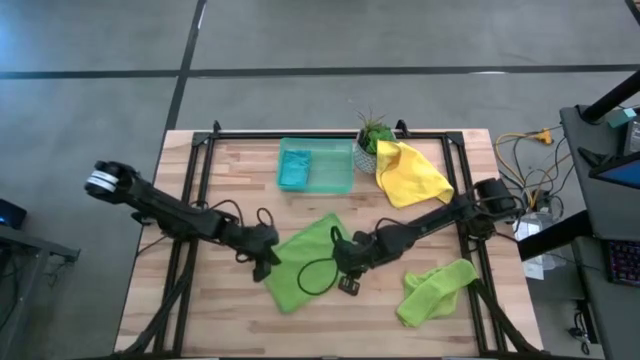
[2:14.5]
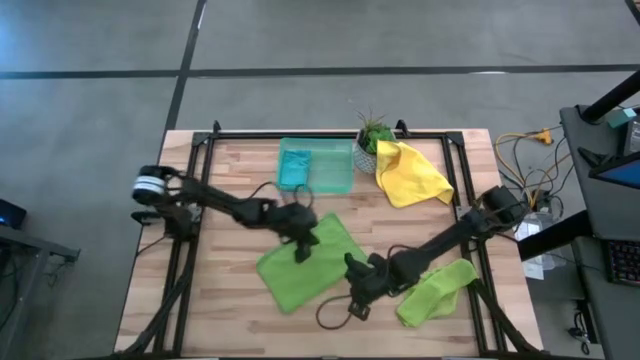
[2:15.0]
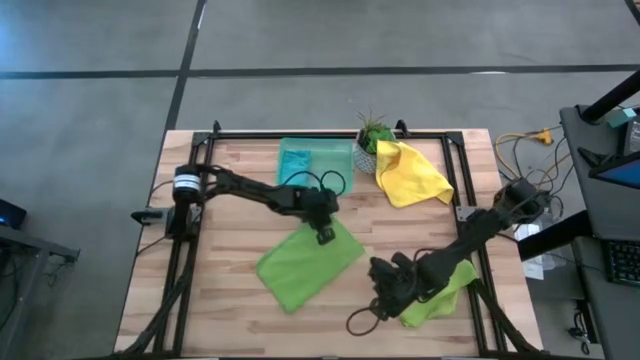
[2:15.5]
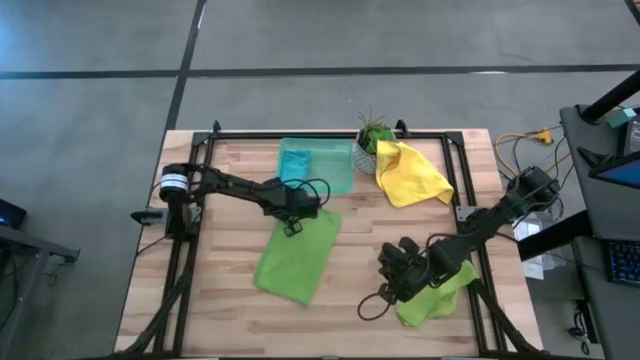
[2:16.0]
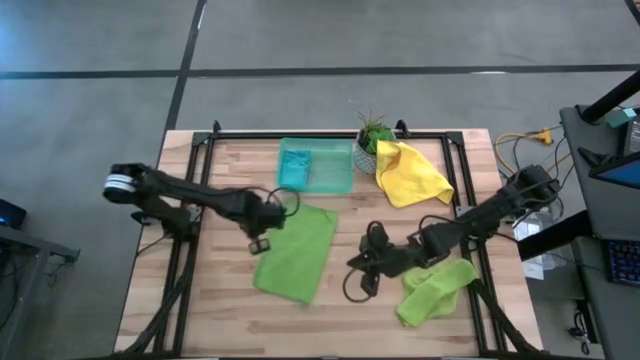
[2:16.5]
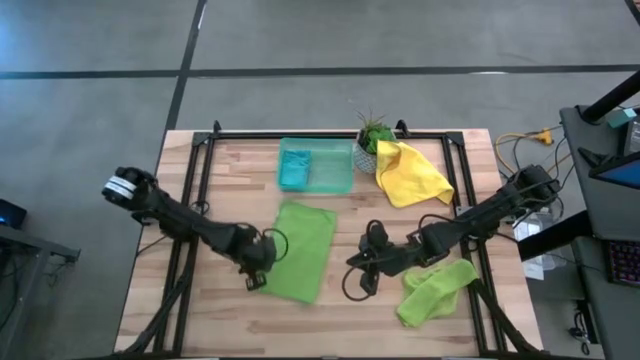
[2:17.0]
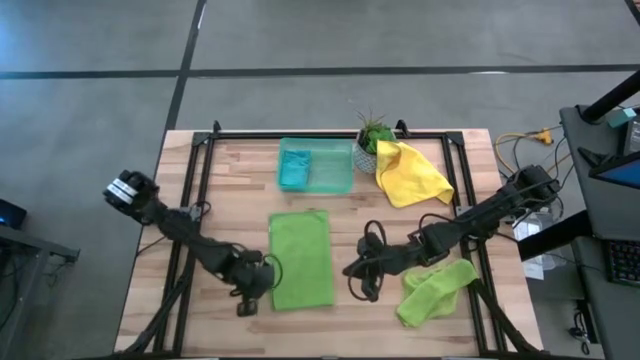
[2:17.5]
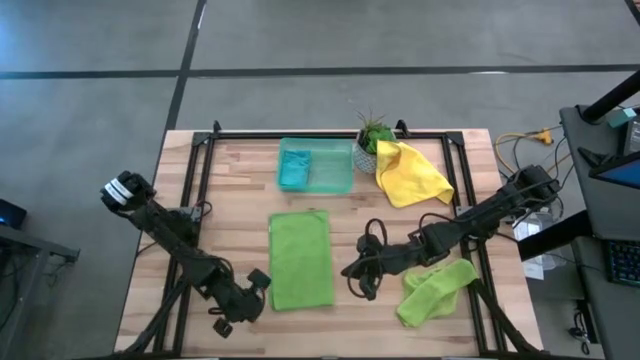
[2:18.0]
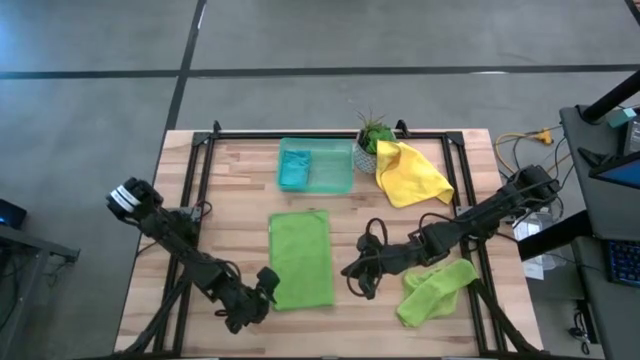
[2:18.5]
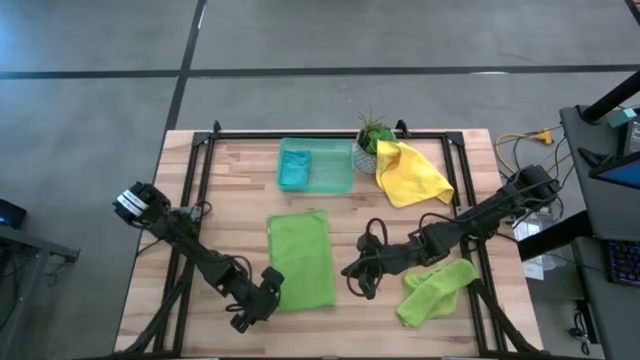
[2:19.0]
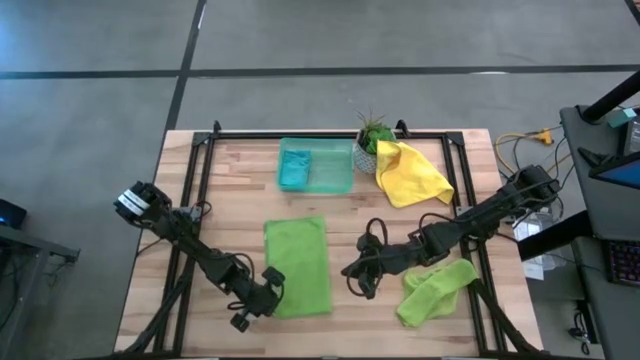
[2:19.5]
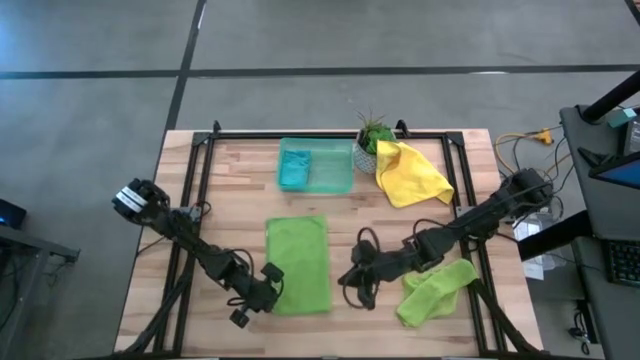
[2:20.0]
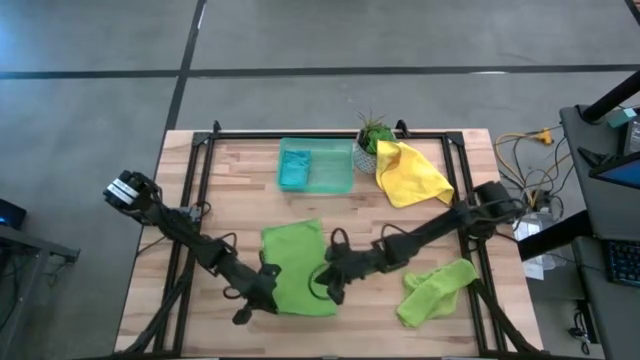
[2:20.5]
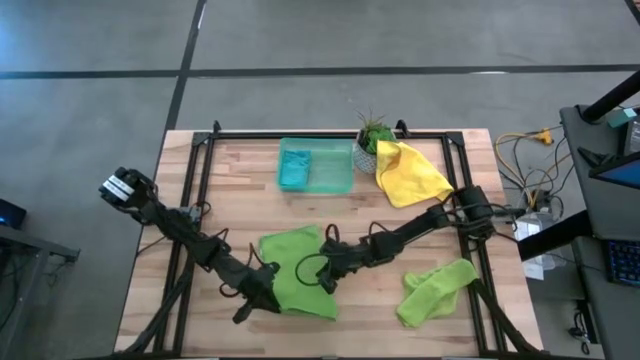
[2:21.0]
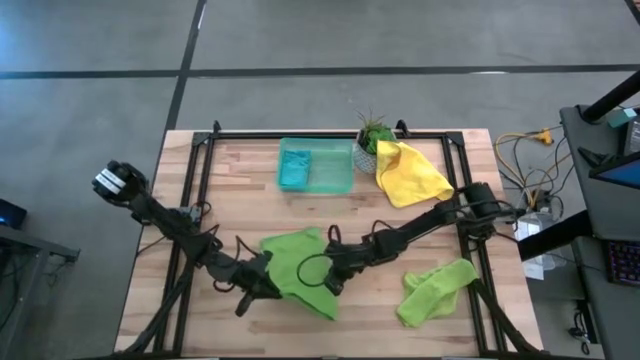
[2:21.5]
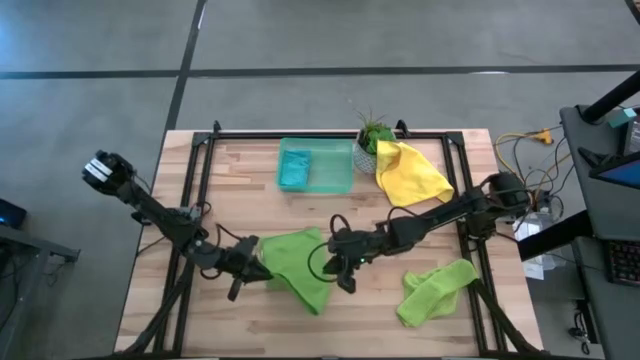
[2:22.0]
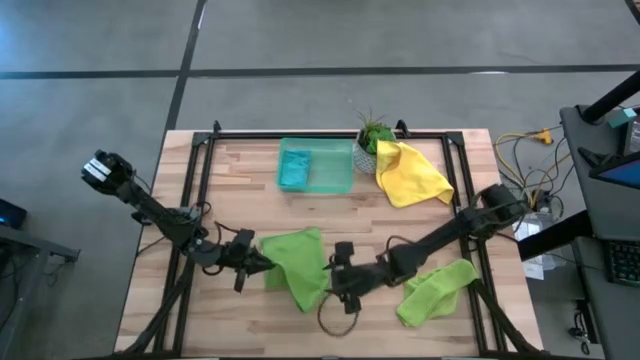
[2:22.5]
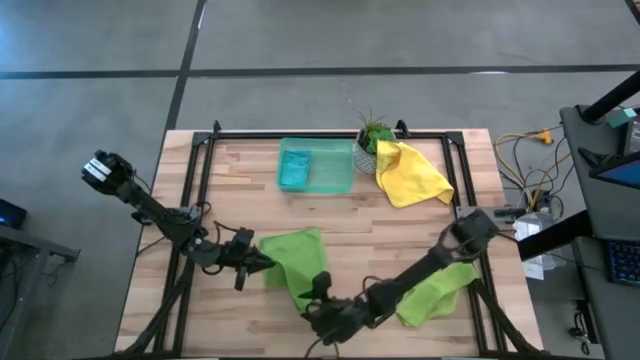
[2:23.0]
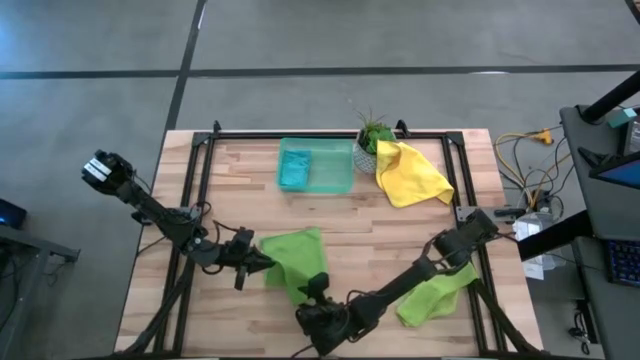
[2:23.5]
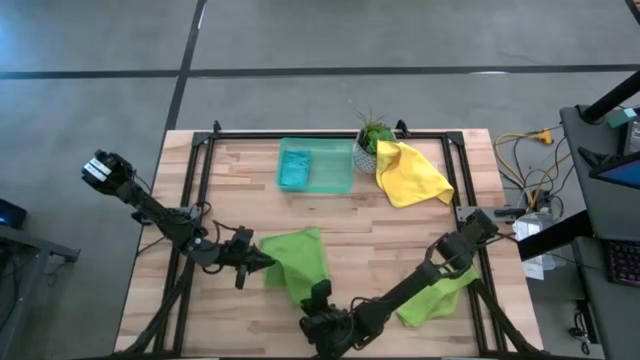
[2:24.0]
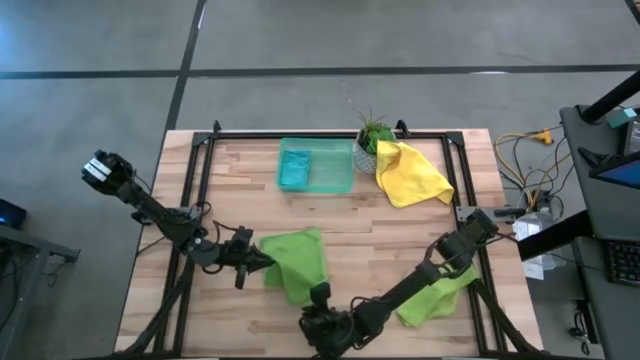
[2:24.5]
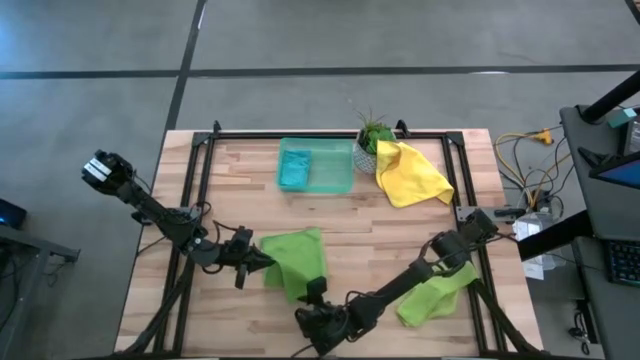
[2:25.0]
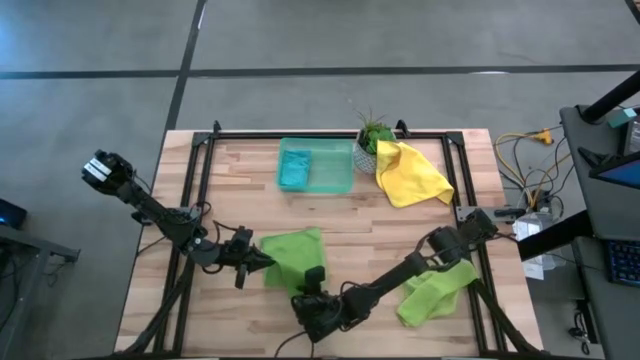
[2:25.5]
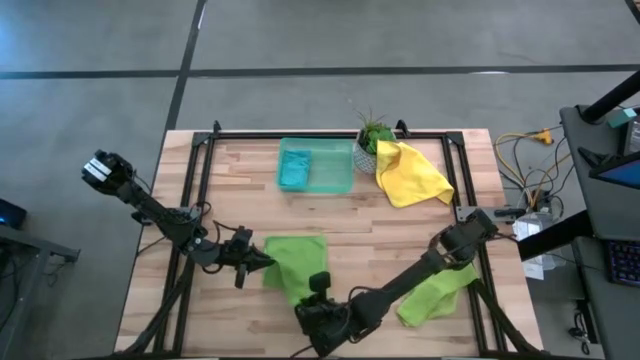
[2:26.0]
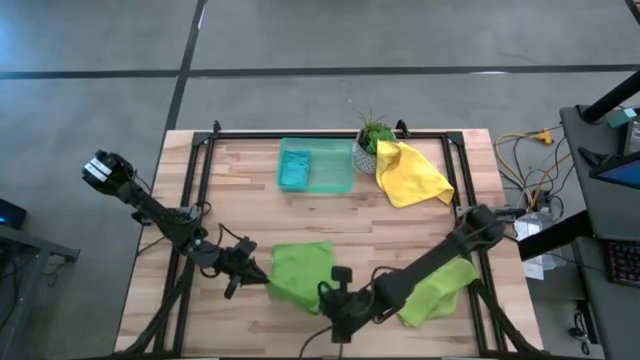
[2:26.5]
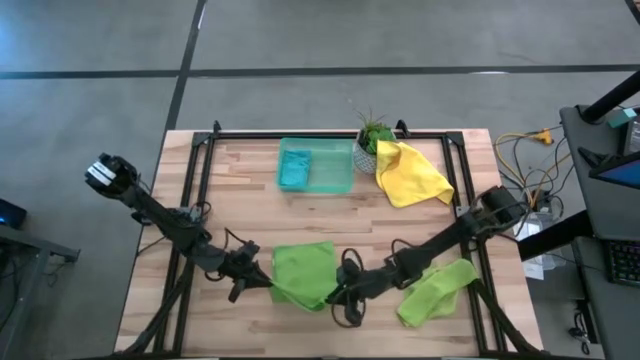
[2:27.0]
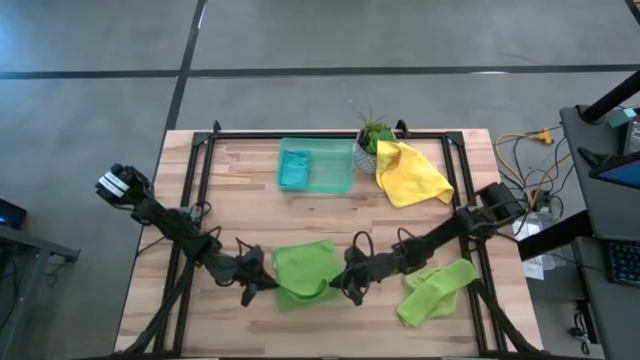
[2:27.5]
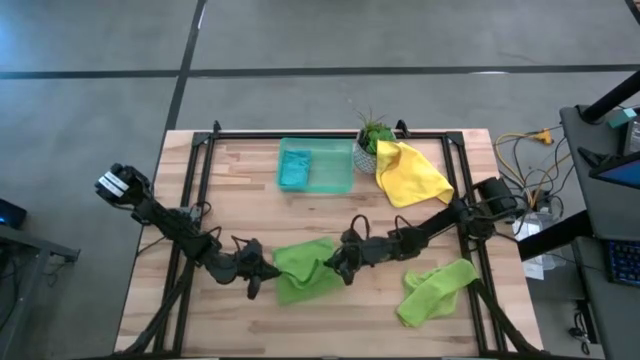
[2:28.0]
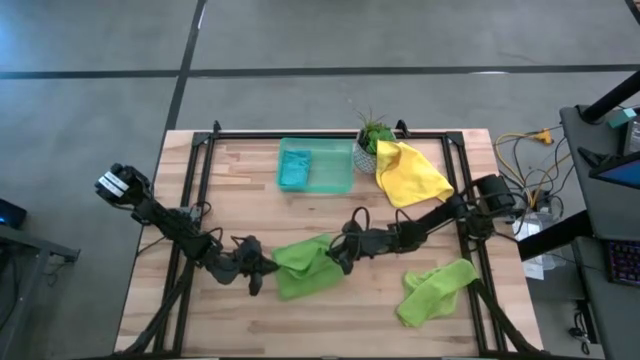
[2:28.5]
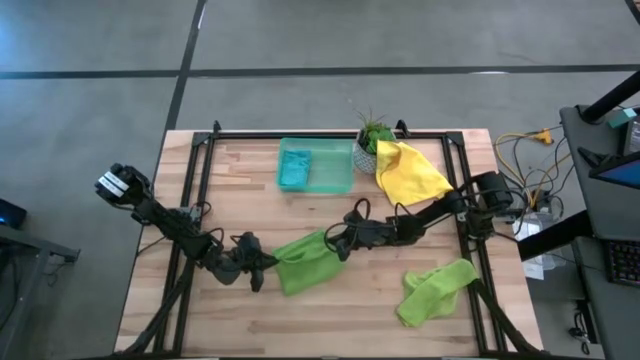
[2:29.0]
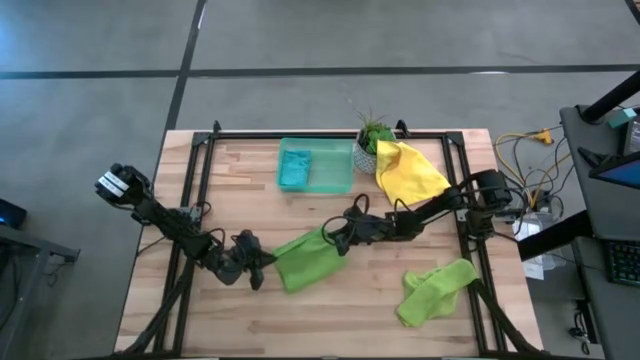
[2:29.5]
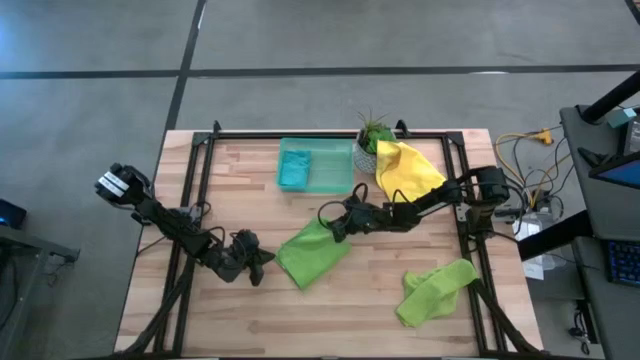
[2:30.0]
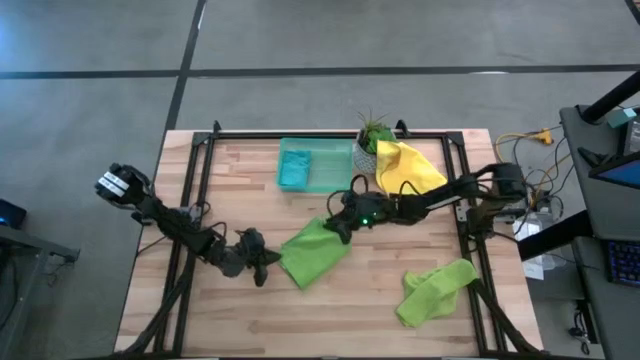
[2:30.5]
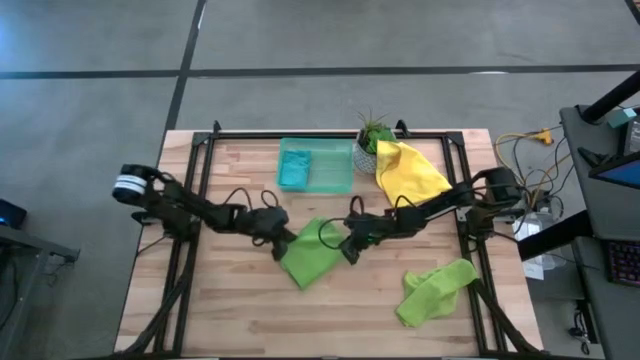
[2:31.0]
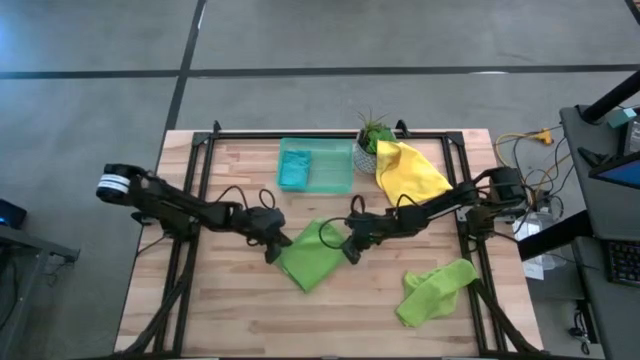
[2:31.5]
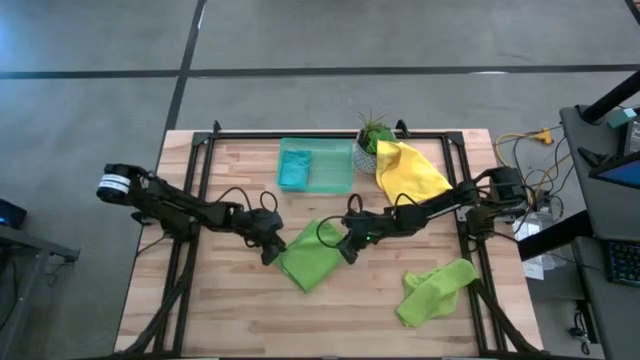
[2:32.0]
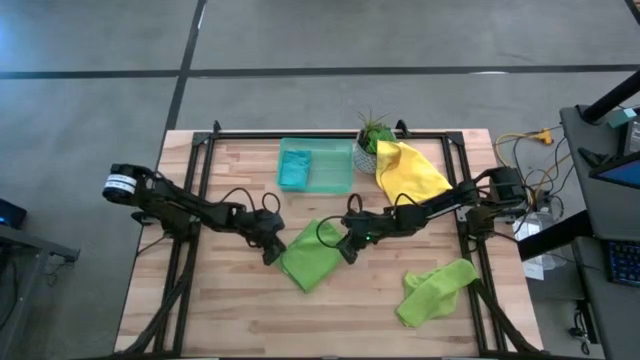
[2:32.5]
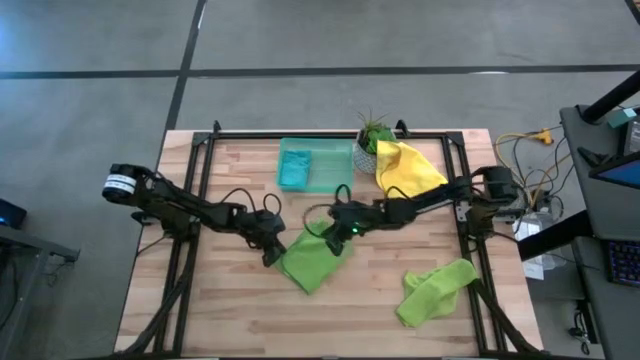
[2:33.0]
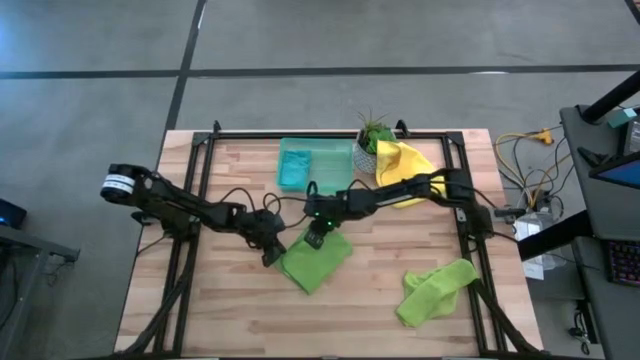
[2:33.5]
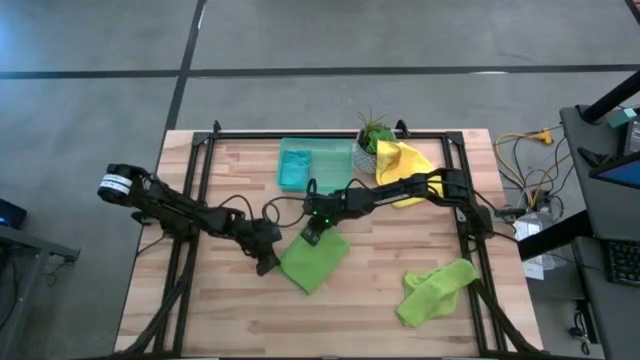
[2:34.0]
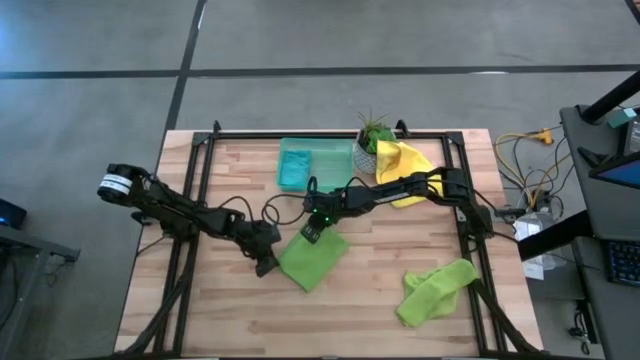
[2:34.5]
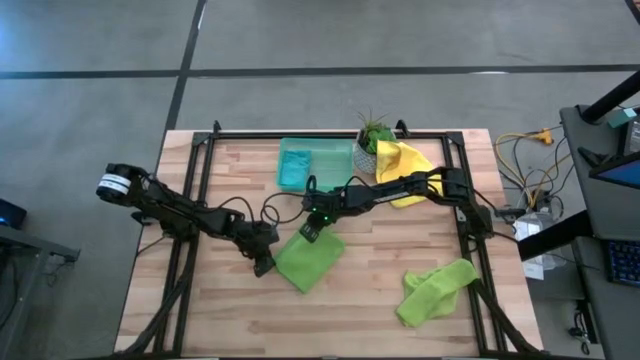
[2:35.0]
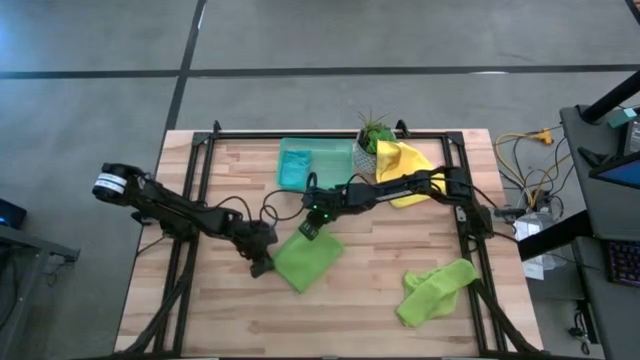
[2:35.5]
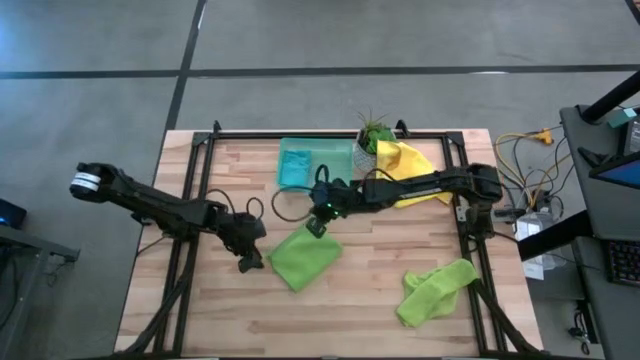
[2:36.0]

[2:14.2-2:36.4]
Task: Fold microfiber towels
Fold the green microfiber towel
